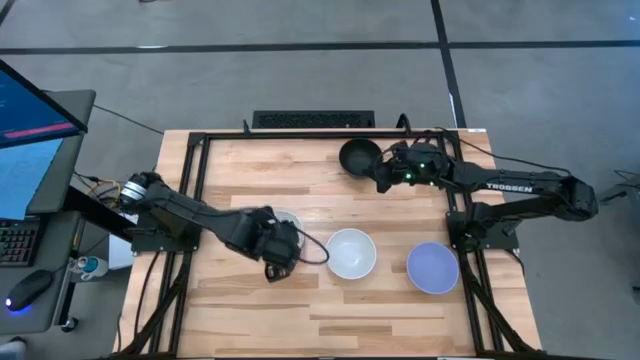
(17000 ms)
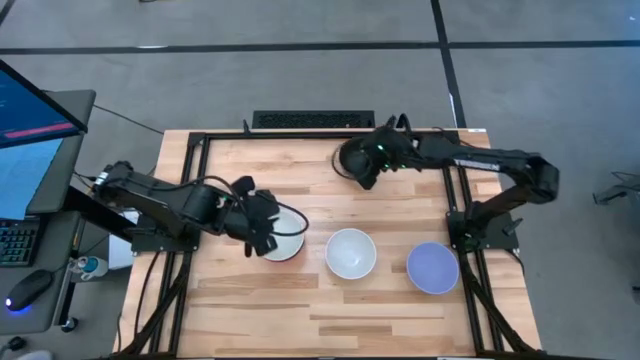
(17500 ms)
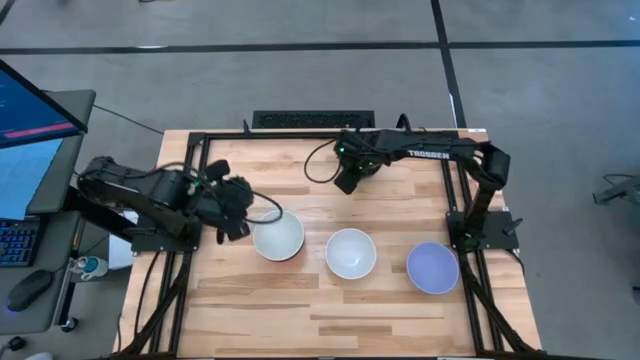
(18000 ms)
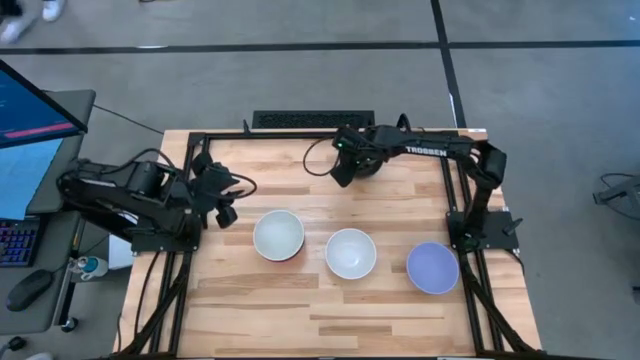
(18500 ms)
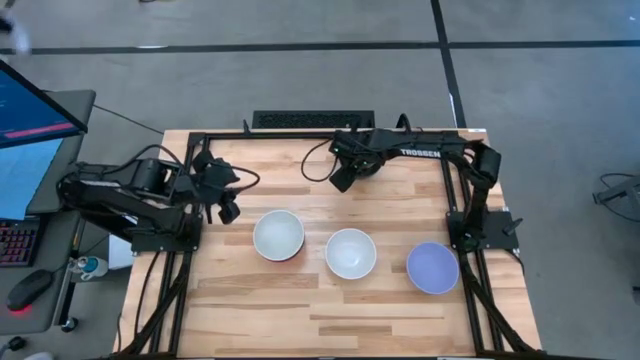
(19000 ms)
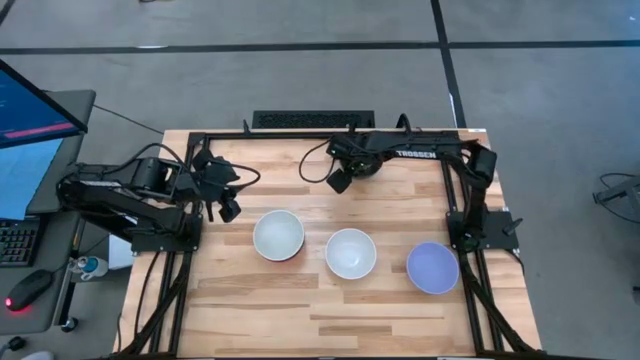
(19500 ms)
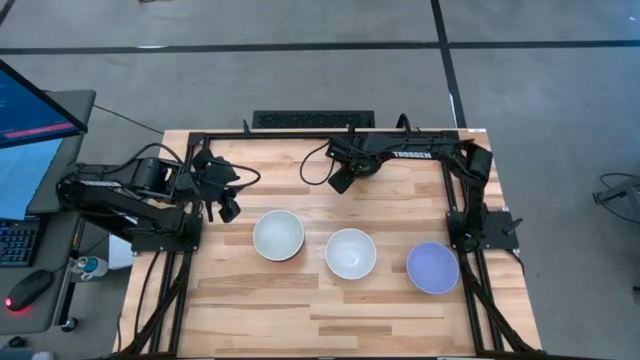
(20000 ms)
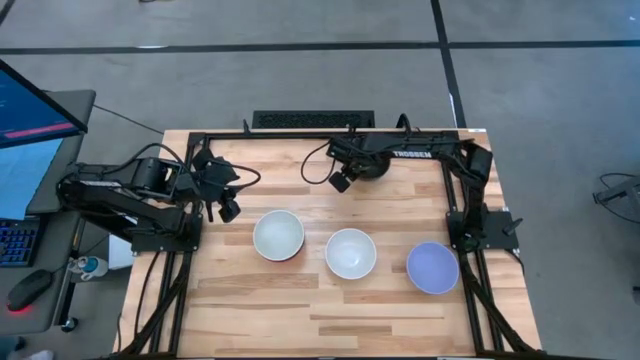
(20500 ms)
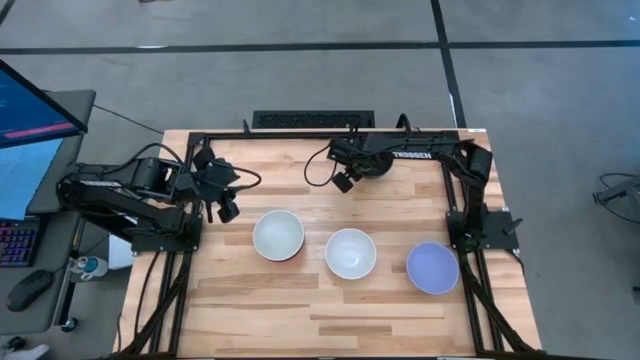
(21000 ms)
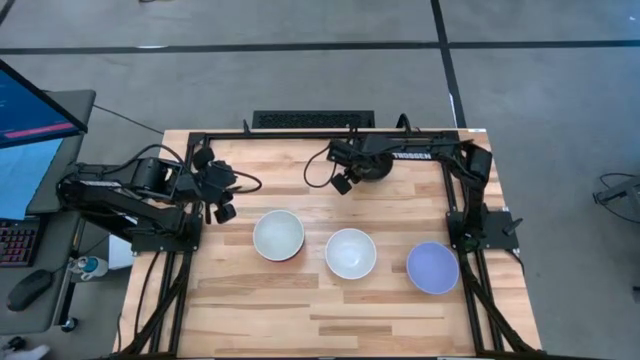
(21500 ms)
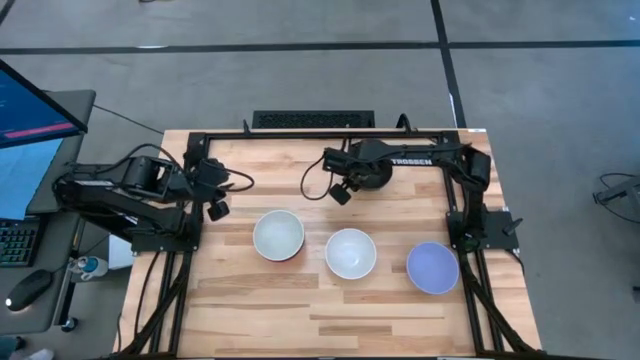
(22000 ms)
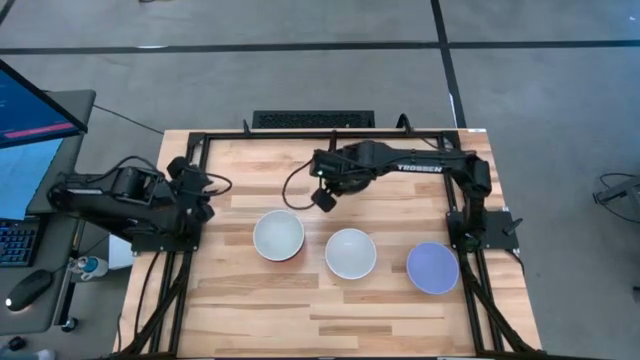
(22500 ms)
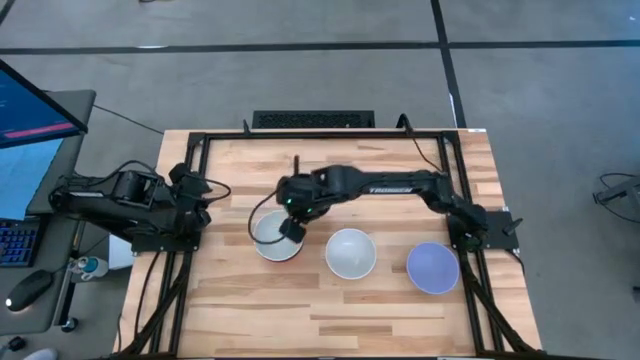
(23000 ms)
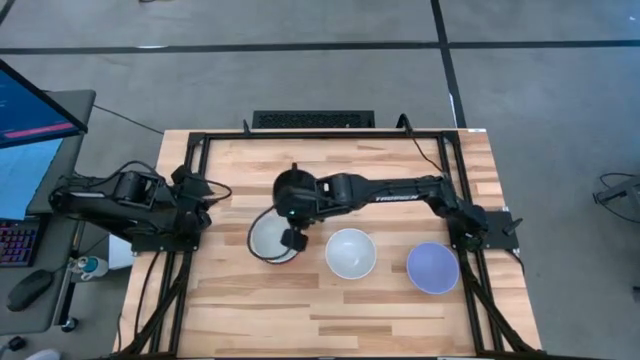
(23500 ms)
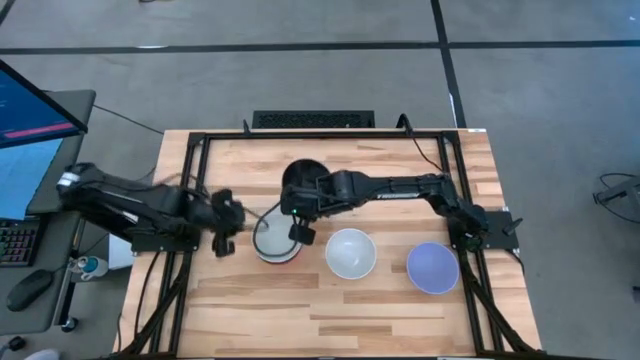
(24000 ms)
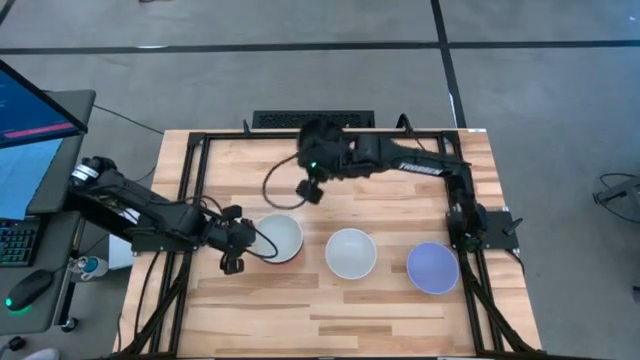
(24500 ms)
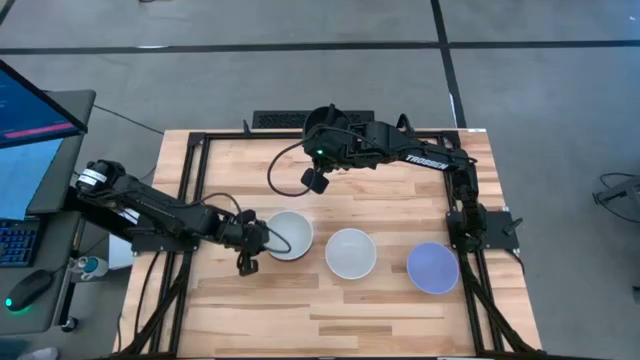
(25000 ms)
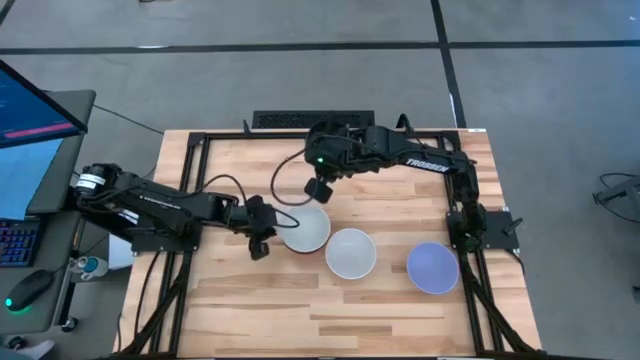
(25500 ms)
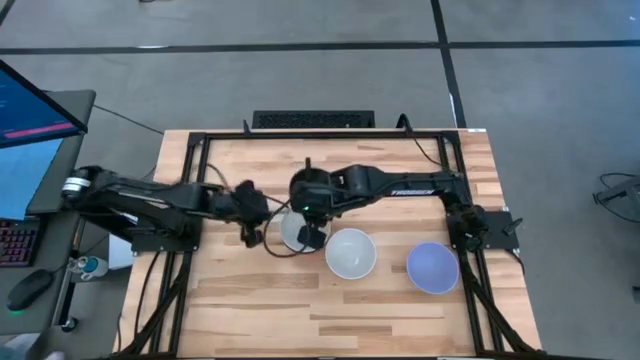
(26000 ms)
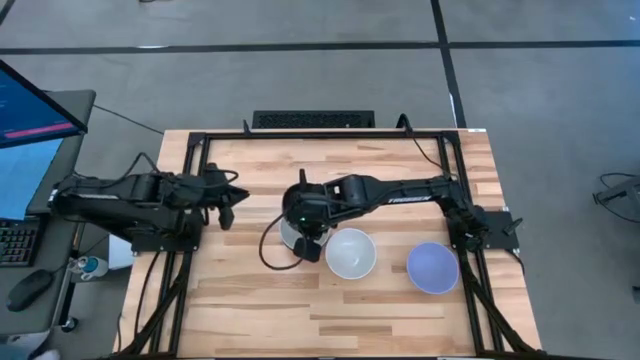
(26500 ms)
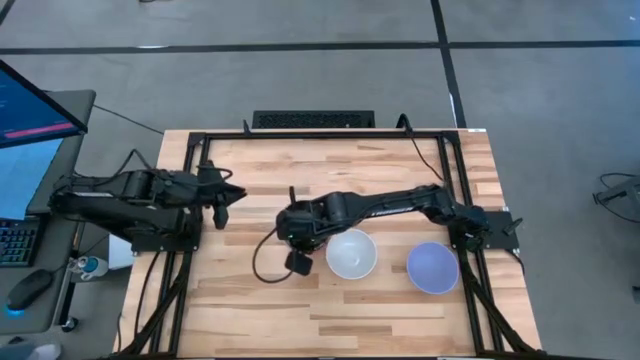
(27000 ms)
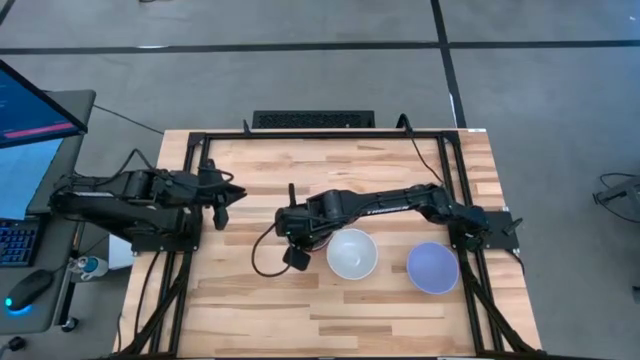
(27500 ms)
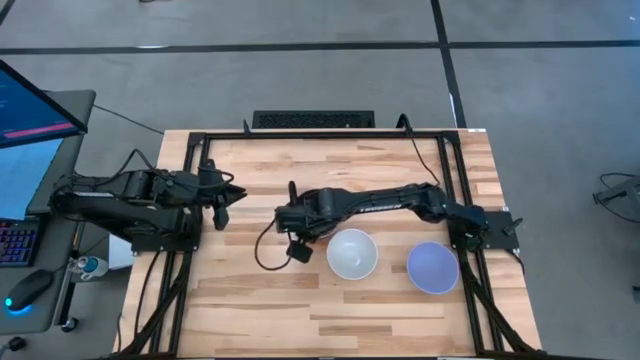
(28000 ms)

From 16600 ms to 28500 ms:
Task: Nest bowls inside each other
Stack the black bowl on the left white bowl

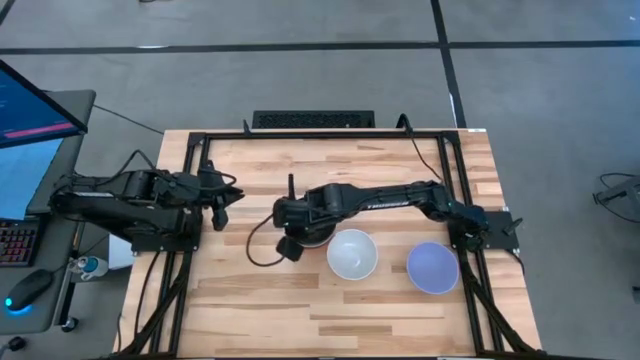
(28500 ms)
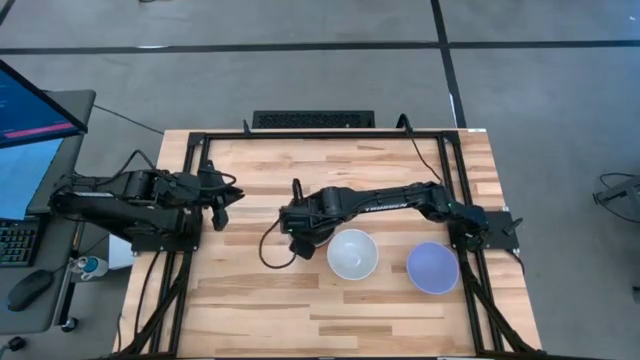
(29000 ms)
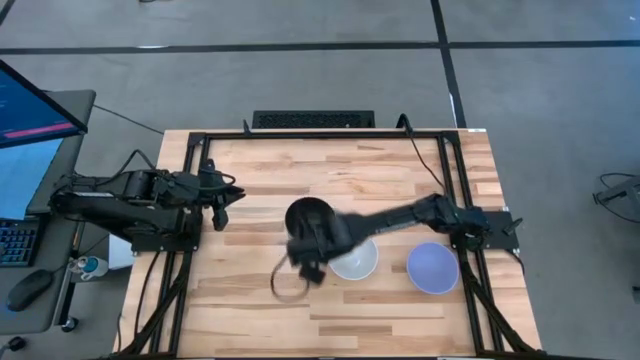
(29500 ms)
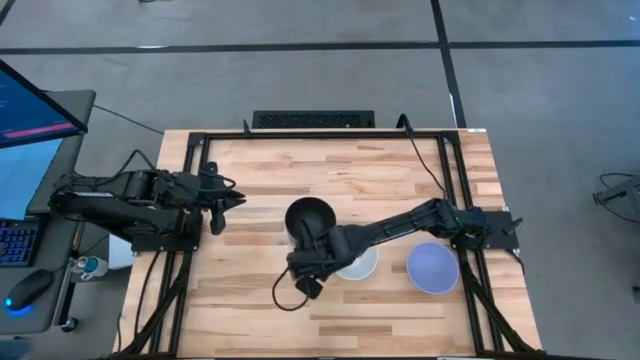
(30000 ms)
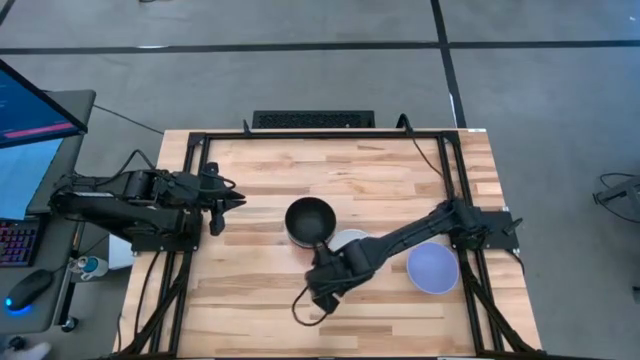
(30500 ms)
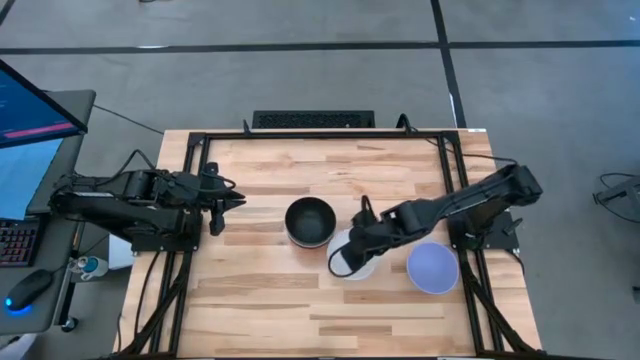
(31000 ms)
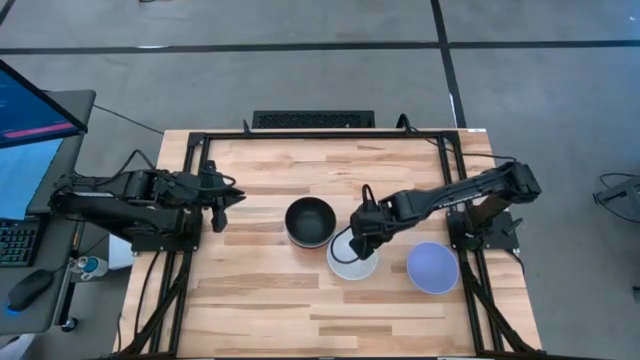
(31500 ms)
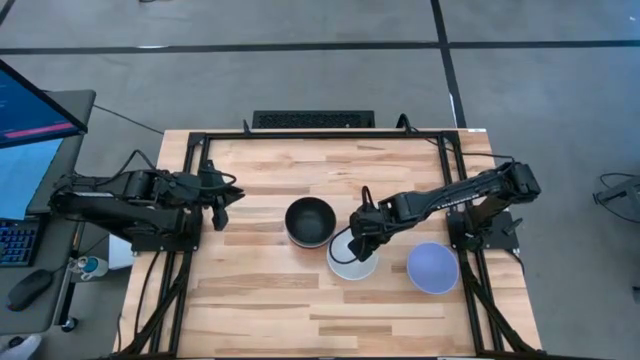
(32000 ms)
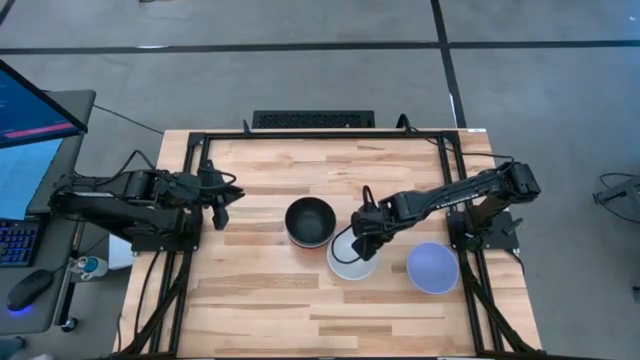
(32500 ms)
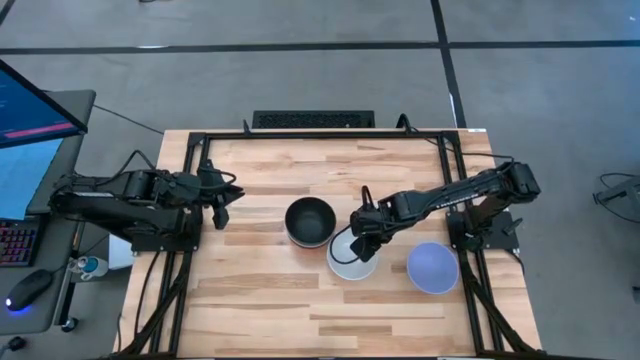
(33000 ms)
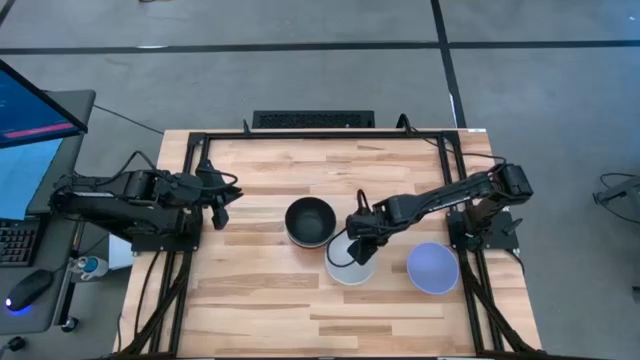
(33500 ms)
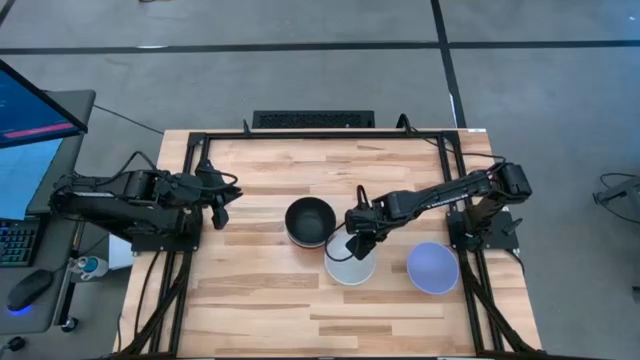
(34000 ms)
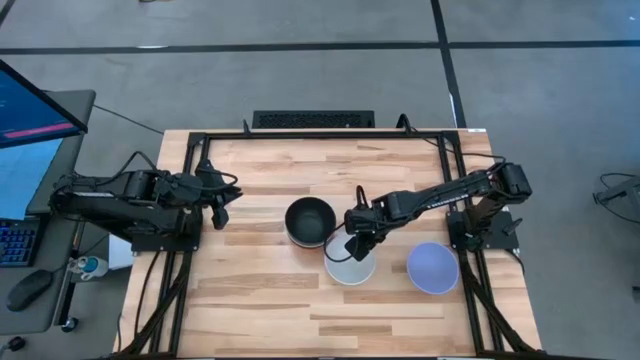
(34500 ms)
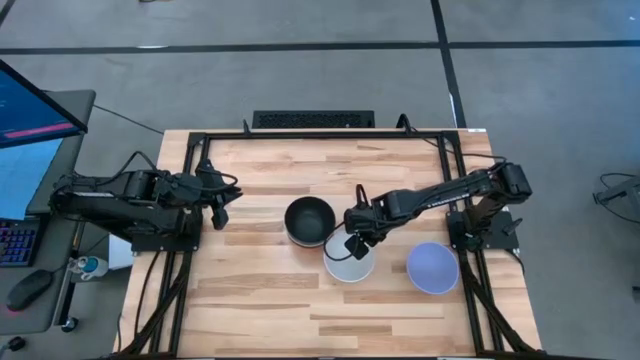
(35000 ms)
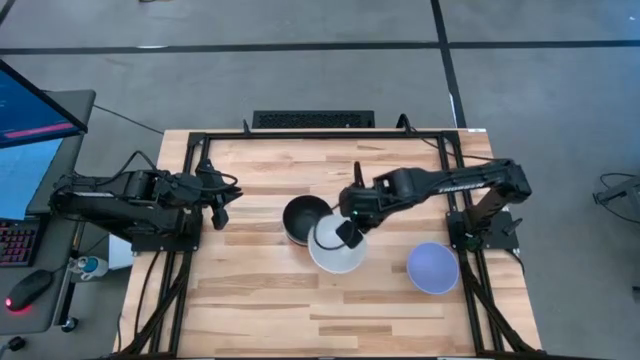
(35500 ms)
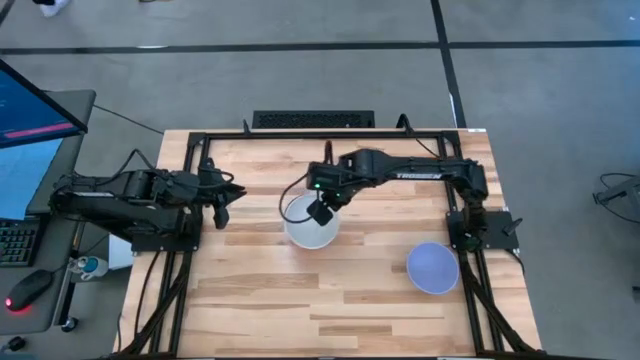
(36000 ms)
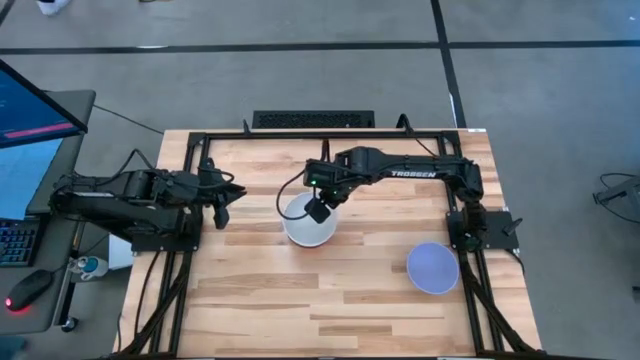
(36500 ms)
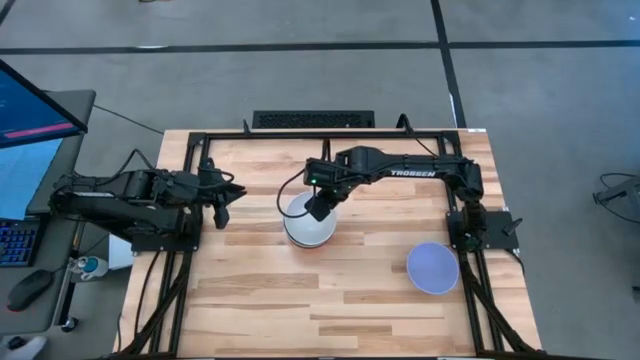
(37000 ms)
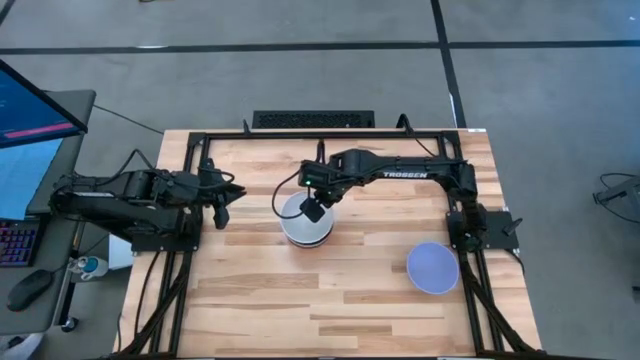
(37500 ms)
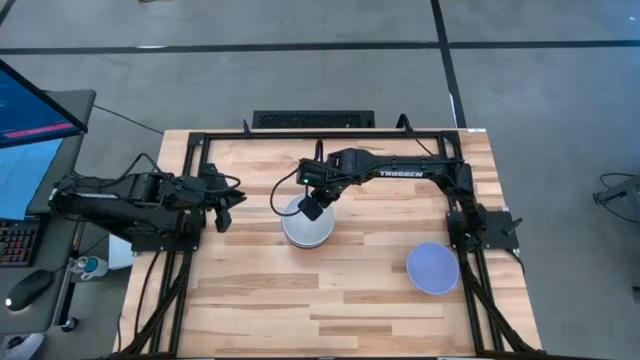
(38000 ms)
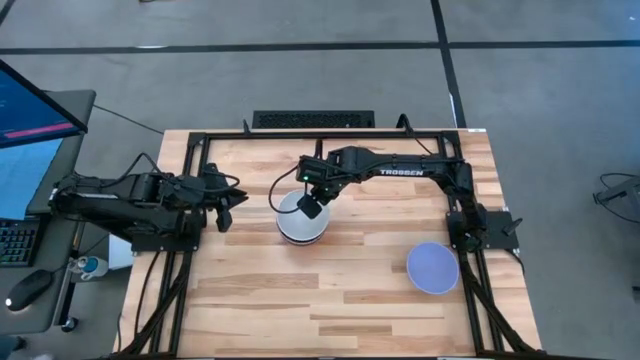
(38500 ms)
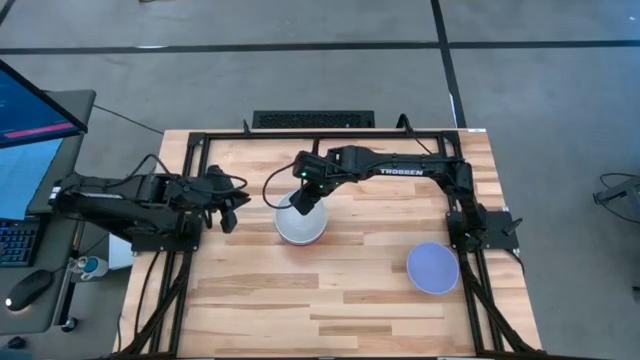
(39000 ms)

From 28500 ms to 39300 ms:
Stack the white bowl on the black bowl
